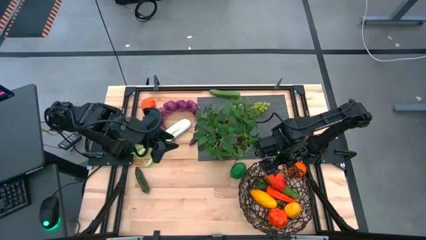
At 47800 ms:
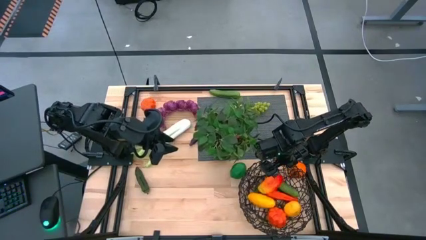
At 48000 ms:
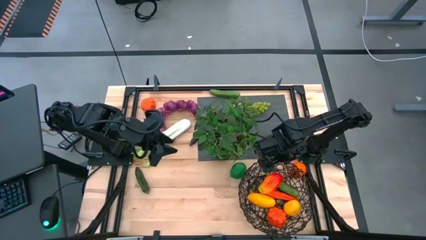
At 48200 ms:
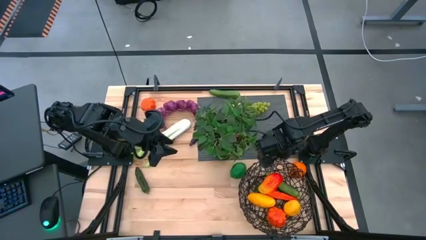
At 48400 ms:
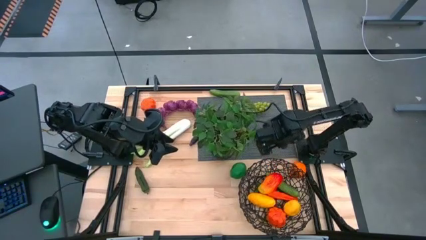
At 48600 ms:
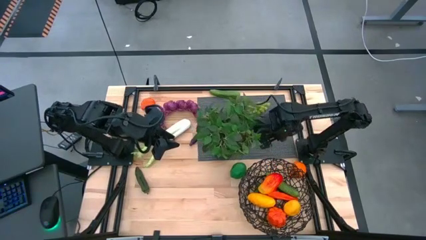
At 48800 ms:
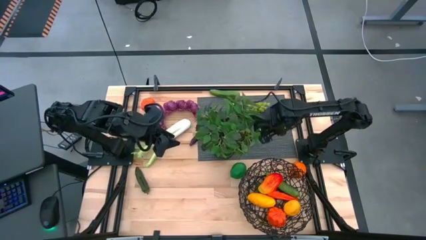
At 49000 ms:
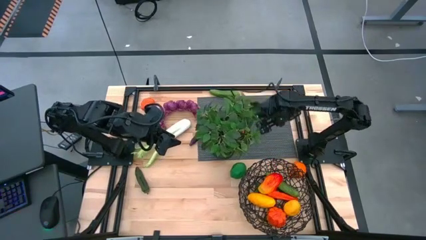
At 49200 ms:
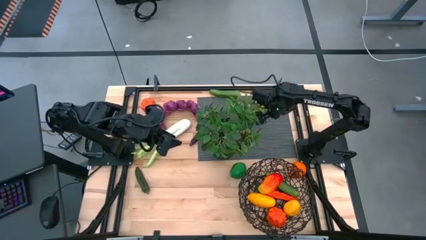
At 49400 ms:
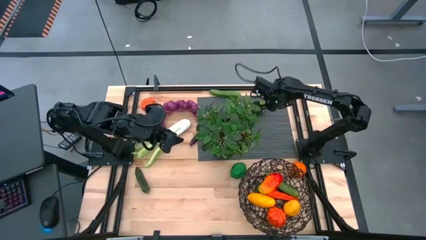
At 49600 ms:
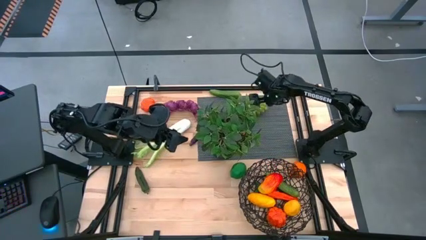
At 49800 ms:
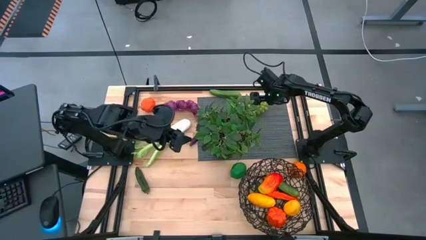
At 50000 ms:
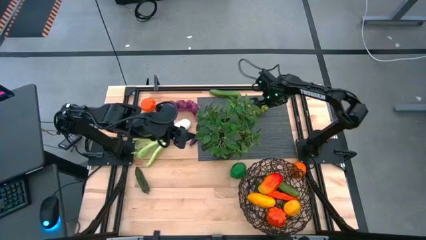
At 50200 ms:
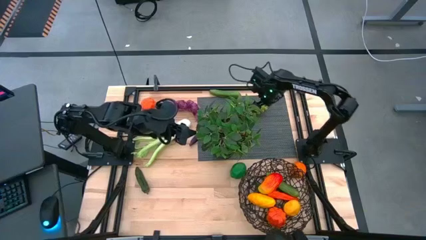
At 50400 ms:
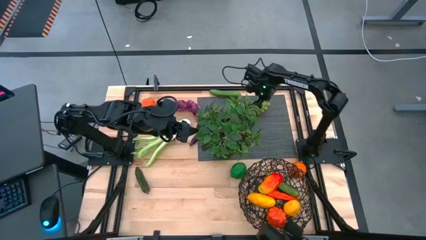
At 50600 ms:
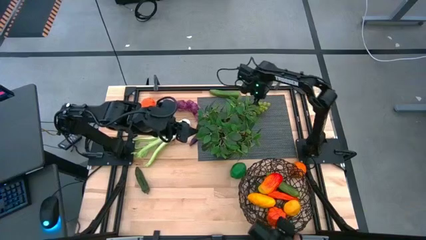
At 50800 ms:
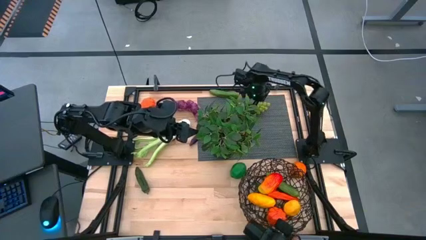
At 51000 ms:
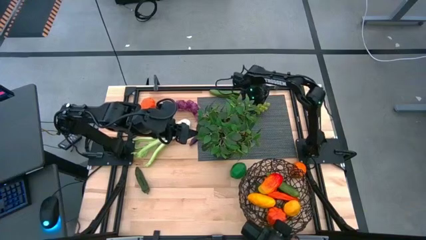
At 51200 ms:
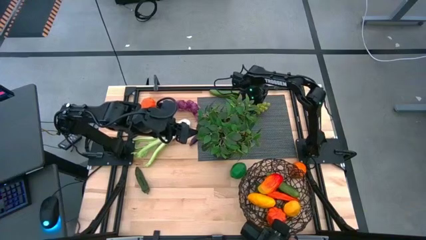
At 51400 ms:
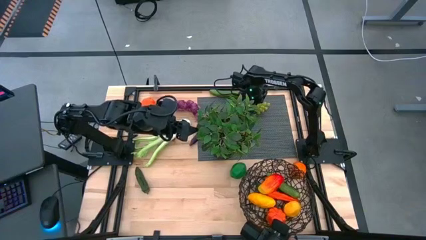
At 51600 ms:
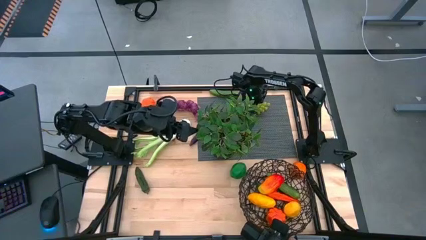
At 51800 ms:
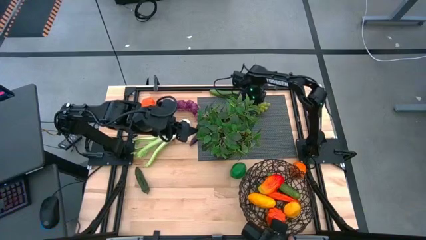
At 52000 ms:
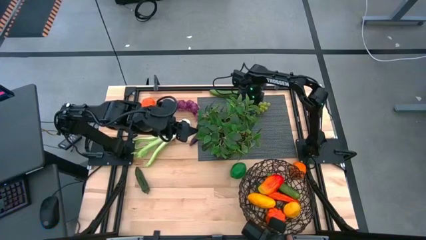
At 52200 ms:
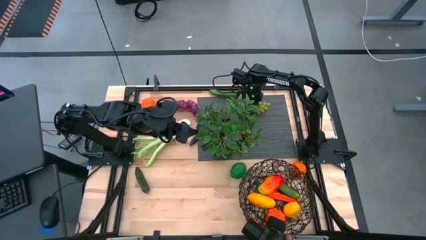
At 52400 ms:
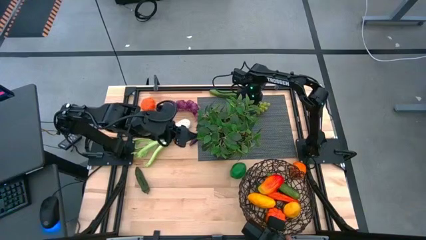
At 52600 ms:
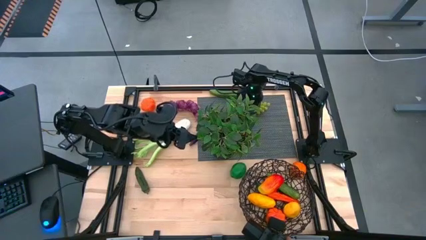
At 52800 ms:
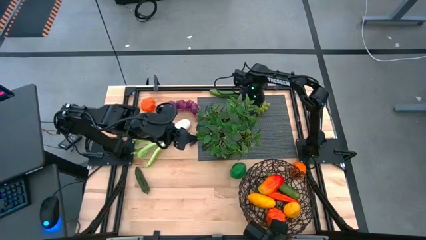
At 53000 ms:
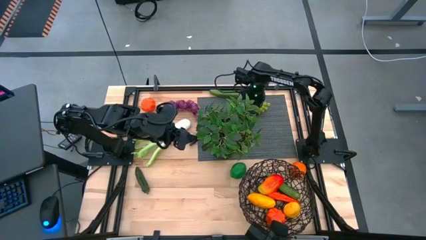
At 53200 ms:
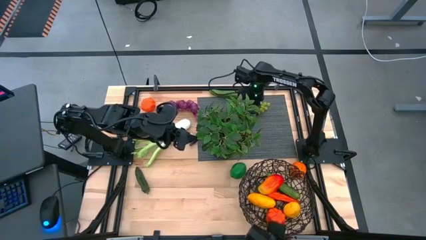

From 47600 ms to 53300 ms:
Task: Build produce basket
Put the green grapes into the brown wire basket

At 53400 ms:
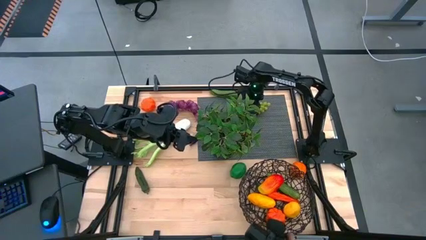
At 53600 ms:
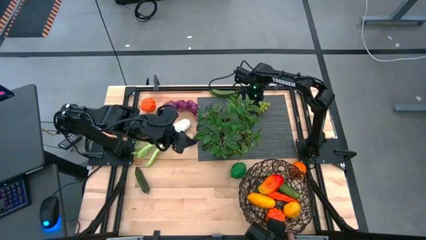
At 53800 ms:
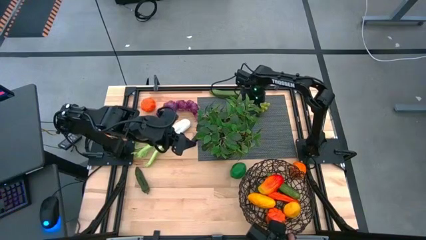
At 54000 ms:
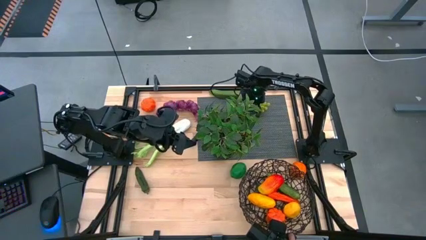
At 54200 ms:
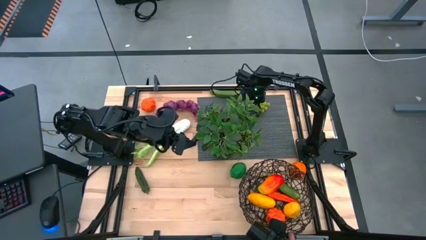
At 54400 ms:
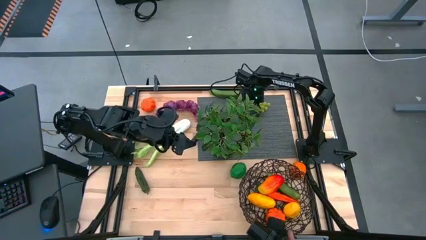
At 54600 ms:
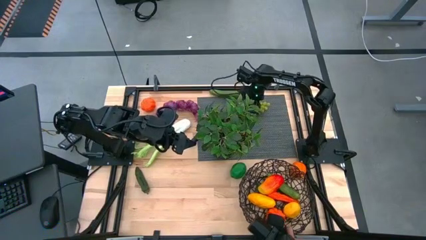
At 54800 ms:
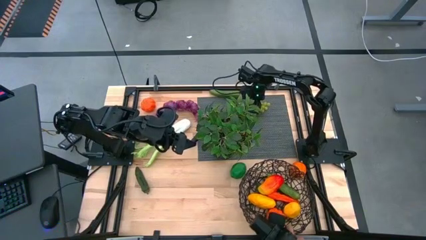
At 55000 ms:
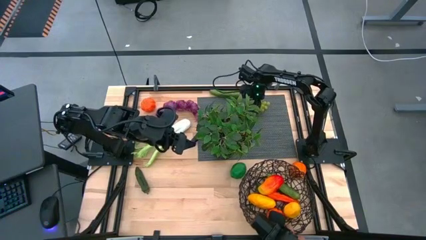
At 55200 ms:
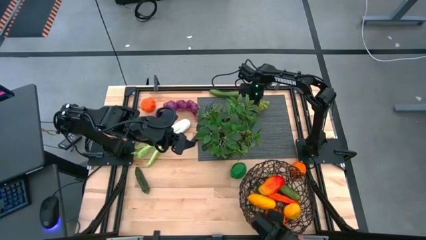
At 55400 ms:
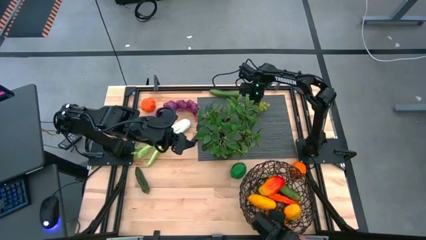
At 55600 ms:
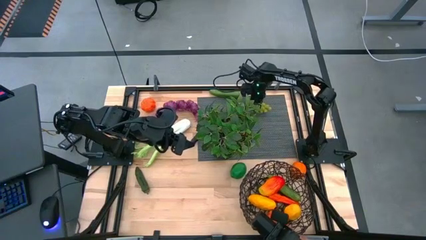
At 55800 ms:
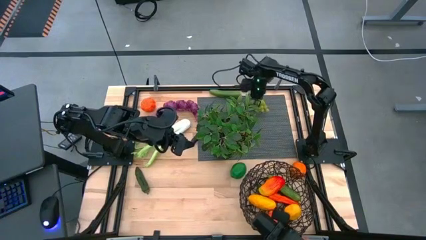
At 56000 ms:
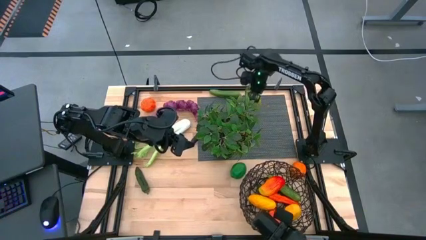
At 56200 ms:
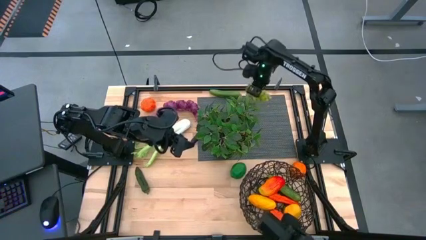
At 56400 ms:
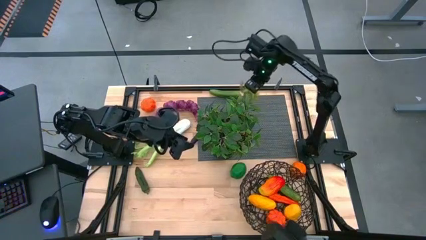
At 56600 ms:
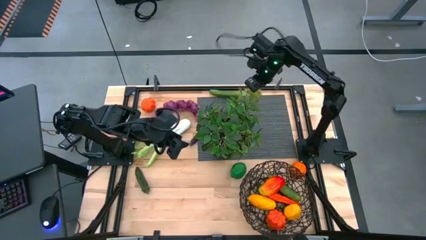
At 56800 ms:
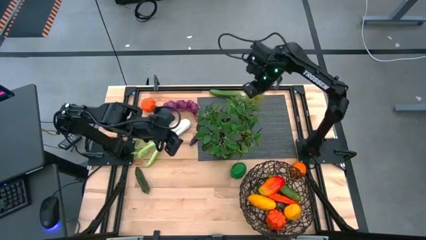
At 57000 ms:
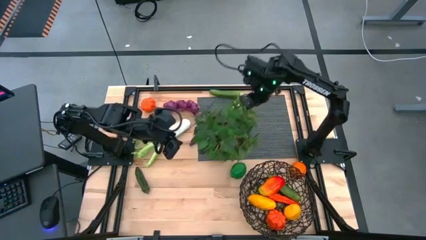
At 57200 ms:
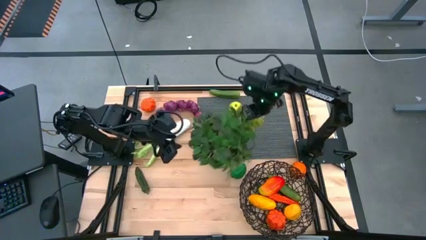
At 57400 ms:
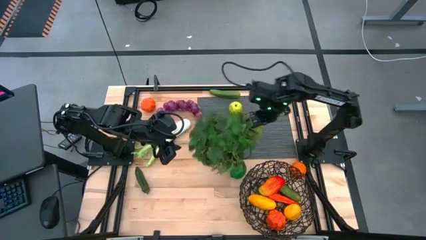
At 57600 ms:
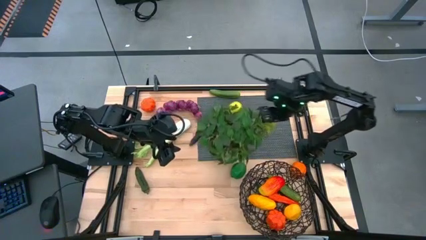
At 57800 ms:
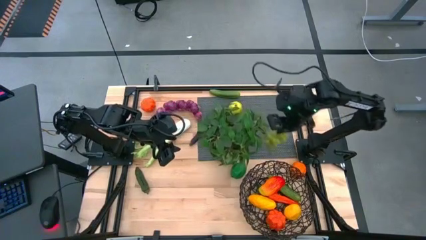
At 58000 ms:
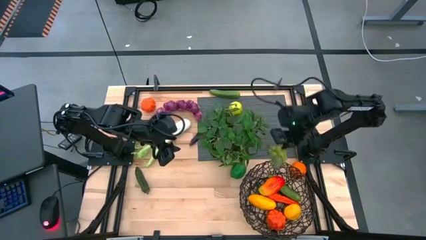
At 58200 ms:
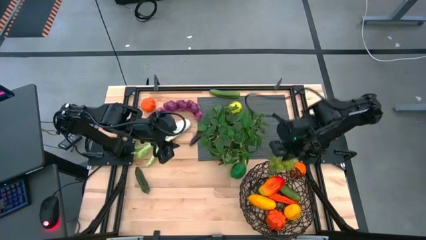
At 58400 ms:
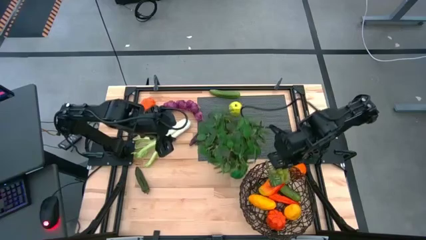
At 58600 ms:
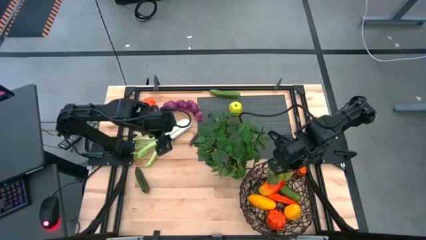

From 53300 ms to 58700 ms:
Put the green grapes into the brown wire basket
